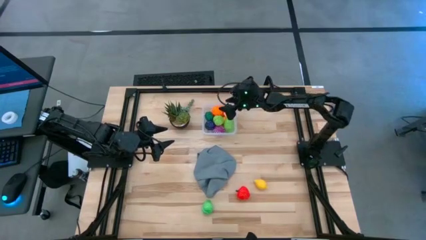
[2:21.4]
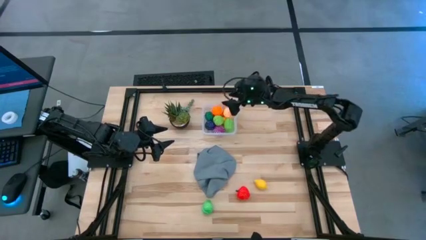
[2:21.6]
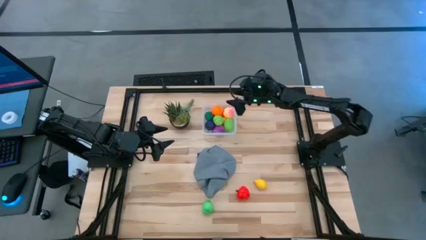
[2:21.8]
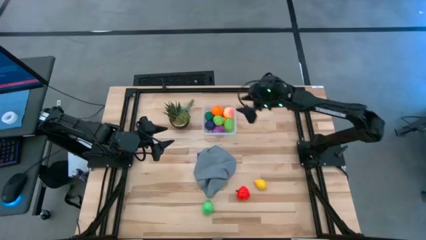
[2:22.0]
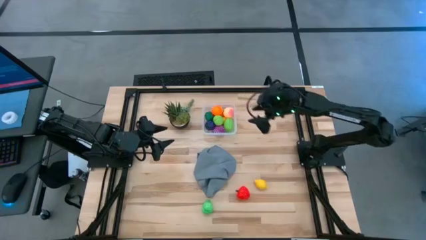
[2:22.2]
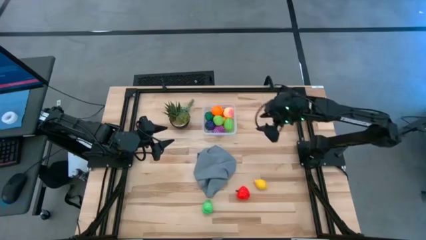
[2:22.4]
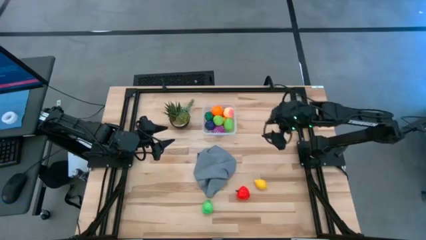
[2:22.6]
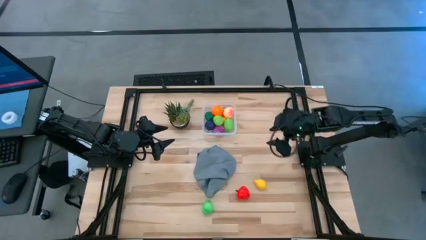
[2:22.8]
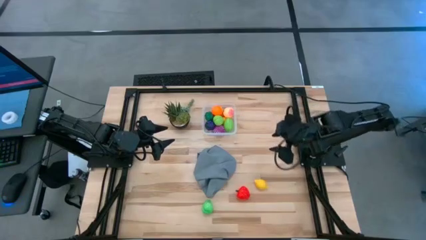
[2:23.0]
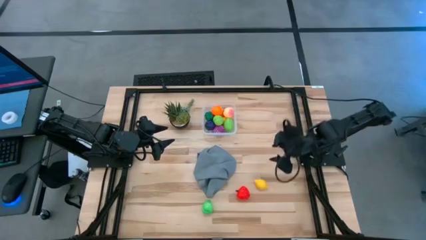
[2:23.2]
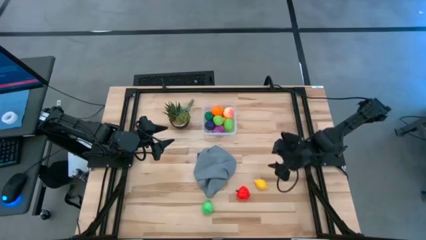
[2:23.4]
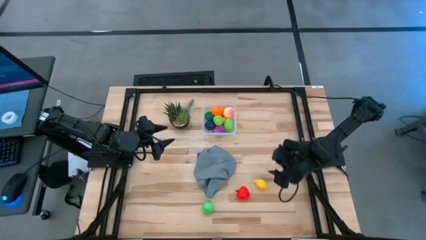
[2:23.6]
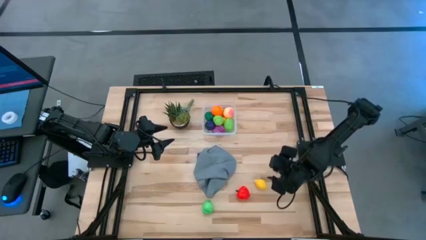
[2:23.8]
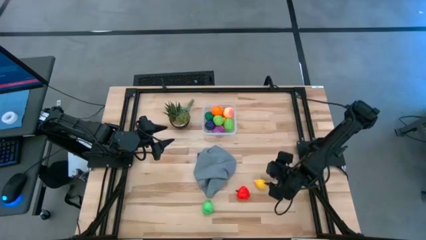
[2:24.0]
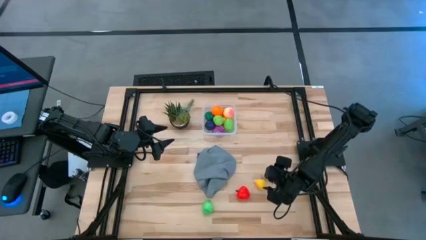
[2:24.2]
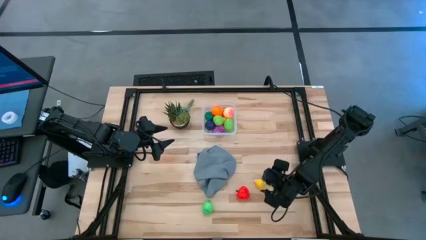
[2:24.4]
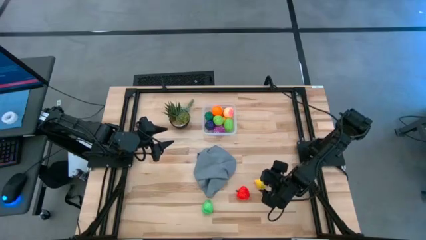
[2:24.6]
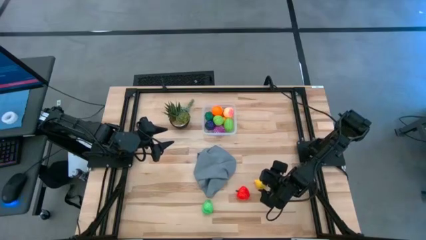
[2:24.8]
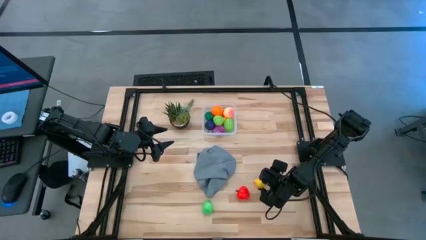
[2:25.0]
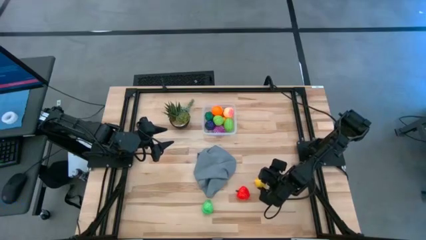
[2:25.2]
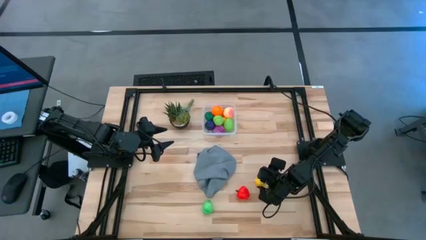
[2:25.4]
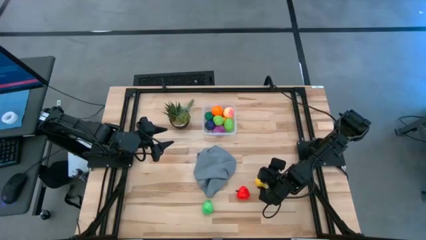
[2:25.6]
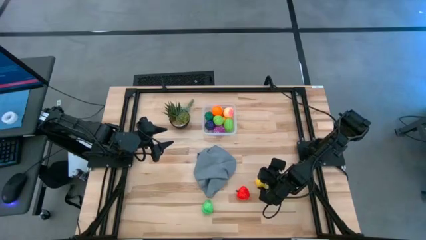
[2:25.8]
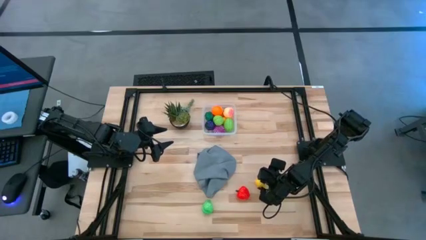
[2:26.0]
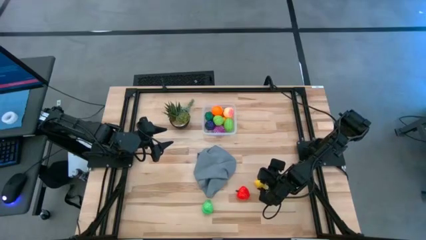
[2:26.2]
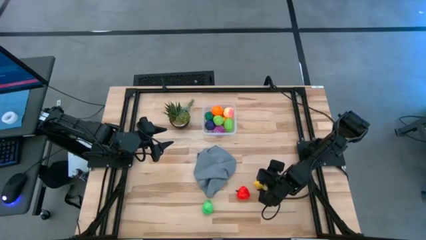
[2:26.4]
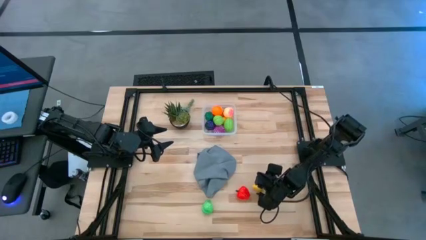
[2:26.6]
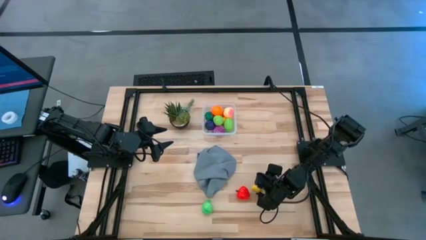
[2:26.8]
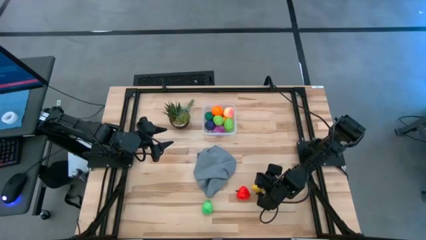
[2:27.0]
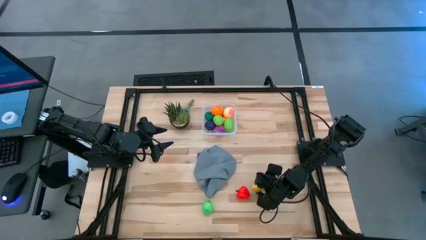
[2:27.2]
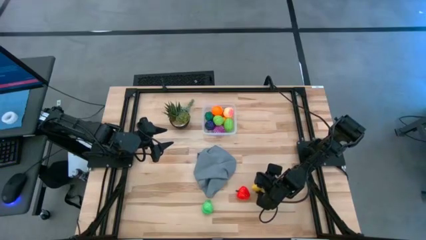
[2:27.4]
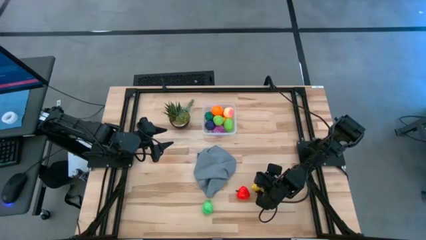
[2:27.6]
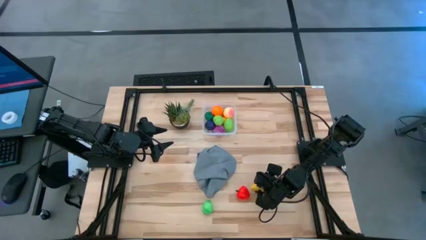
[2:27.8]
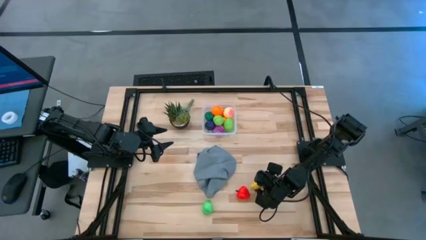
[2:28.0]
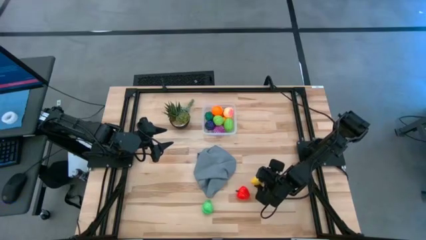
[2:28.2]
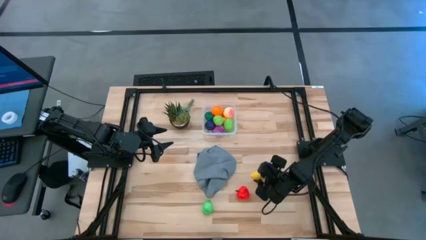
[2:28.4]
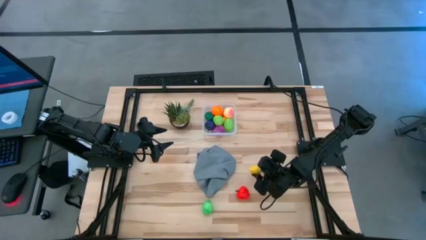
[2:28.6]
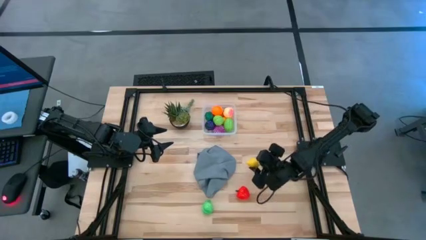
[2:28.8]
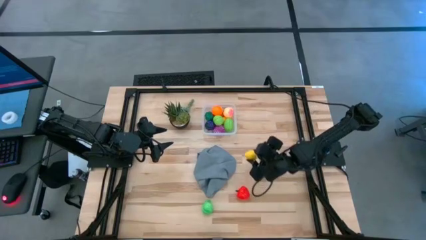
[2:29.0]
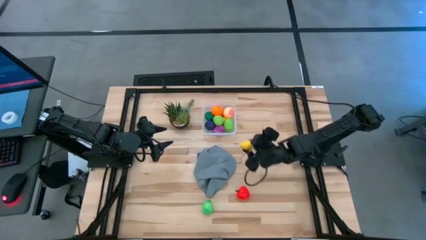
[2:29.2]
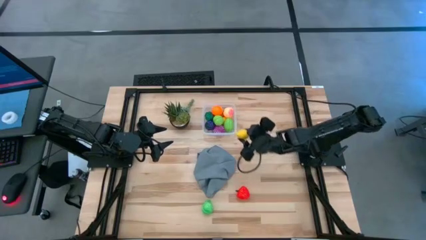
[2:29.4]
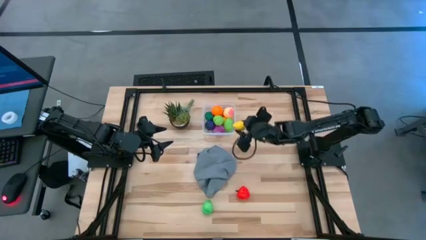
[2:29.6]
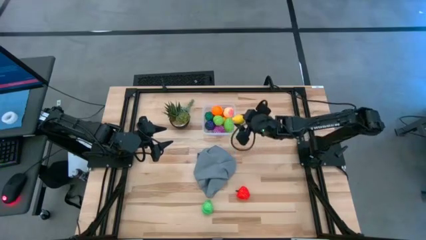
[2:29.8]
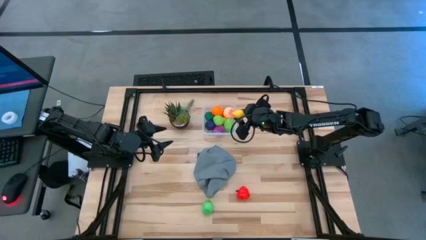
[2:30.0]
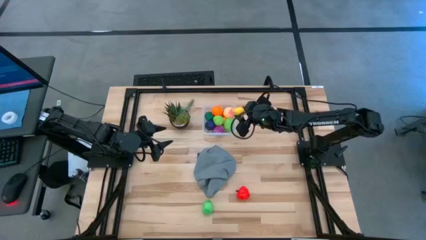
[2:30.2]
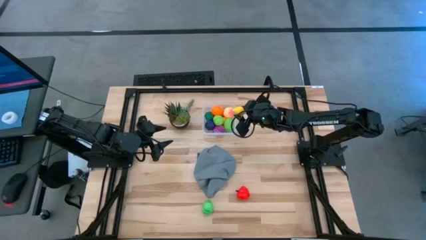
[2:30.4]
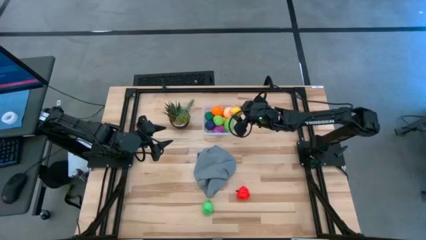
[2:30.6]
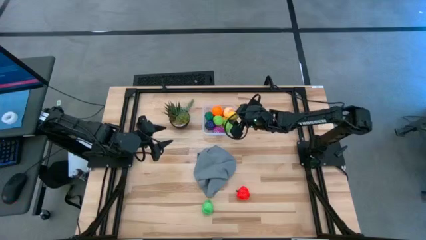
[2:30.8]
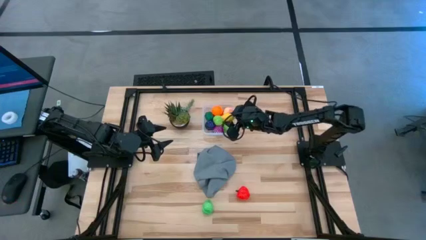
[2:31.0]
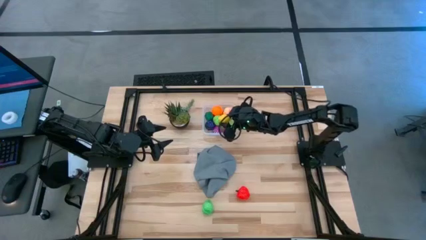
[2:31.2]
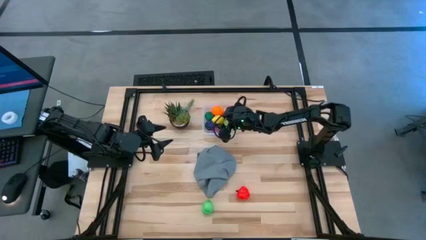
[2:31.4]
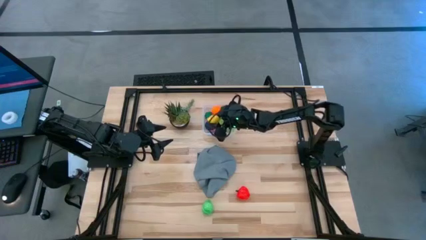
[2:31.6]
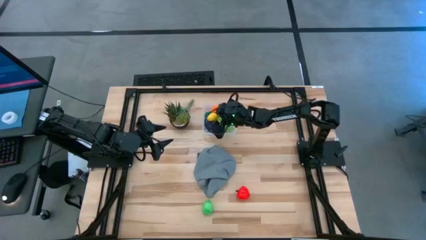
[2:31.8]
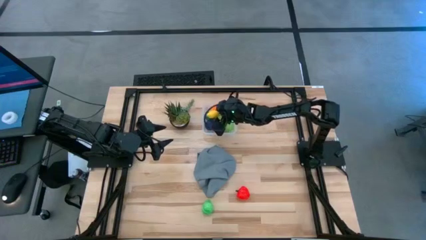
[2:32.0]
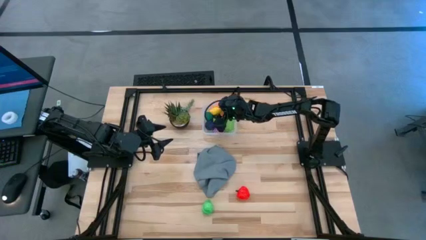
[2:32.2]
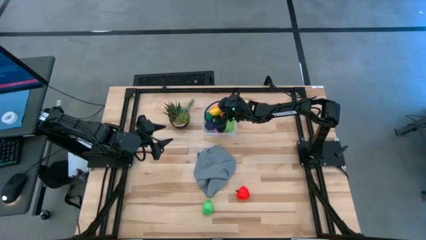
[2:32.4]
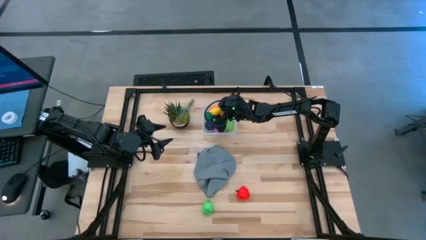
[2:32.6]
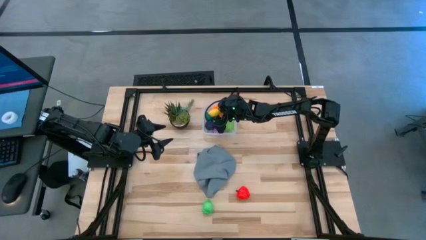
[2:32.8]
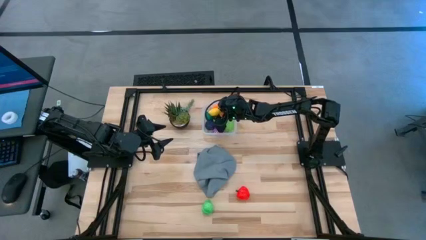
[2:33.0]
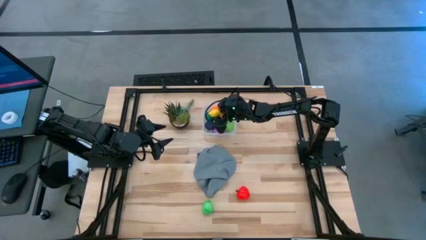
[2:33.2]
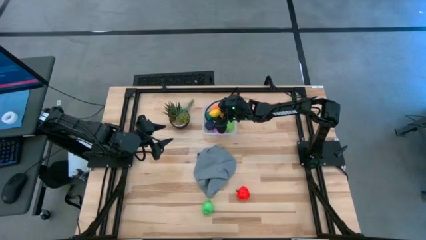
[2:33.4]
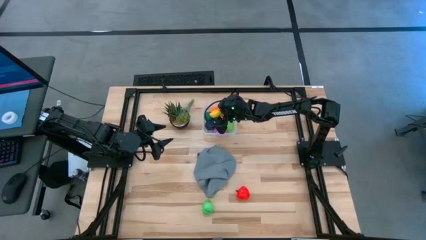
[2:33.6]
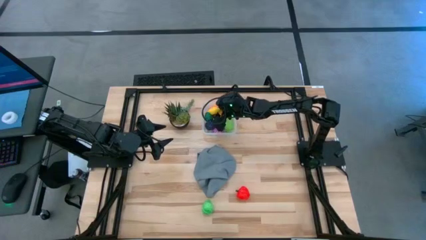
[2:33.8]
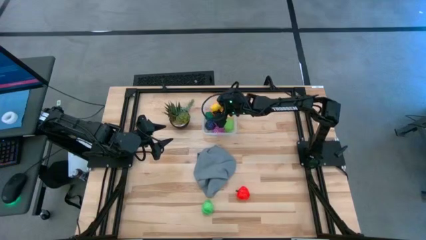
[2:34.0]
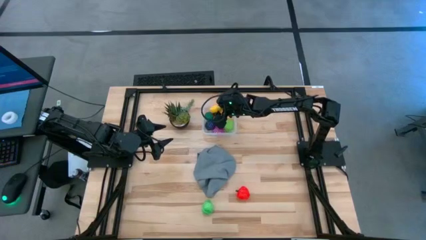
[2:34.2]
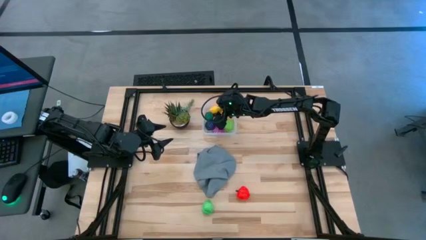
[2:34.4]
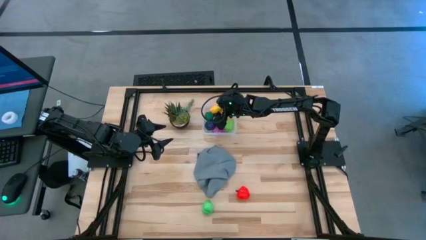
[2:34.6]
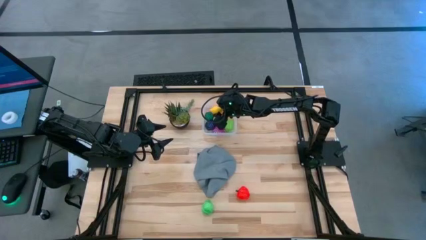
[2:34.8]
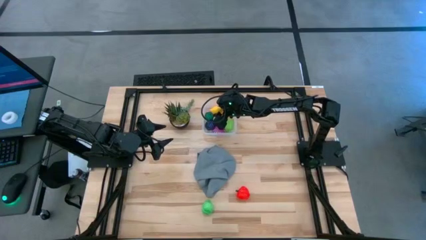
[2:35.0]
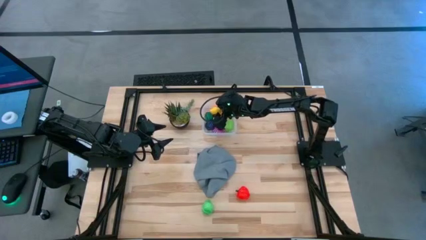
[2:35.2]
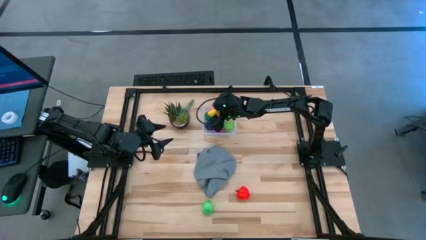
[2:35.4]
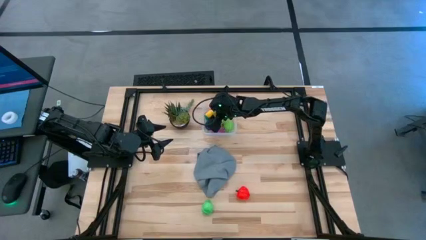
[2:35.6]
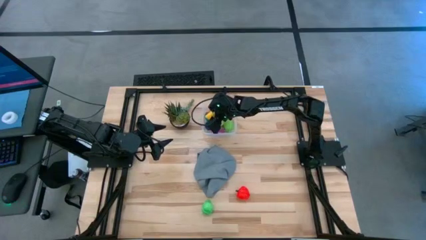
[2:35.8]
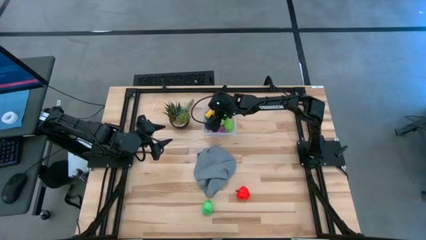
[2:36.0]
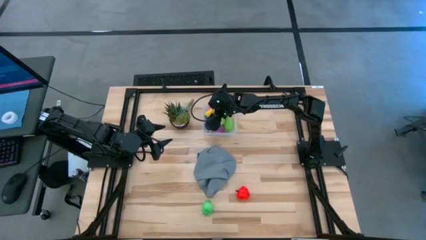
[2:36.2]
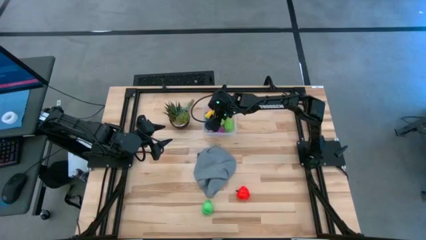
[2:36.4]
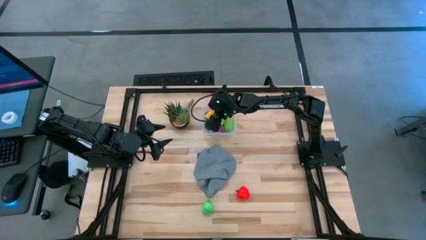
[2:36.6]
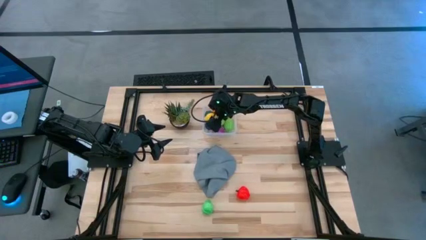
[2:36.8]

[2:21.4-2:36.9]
Task: Pick and placing Produce into tupperware
Put the yellow lemon into the transparent container

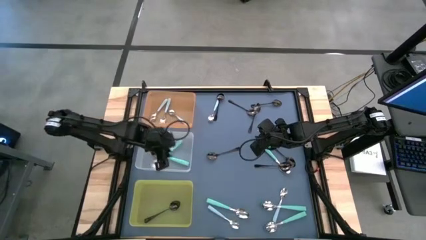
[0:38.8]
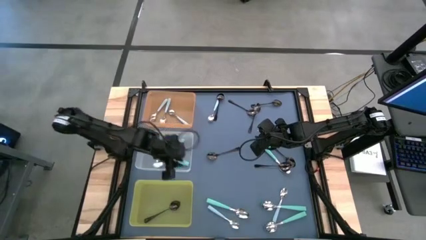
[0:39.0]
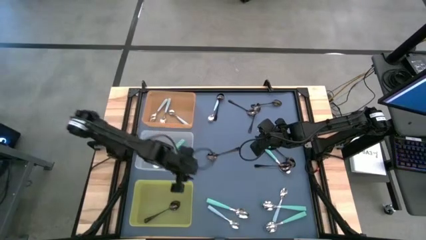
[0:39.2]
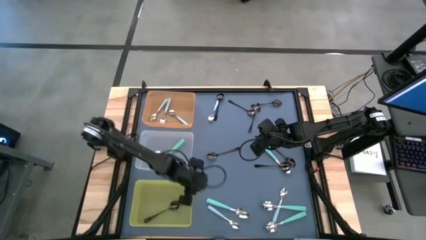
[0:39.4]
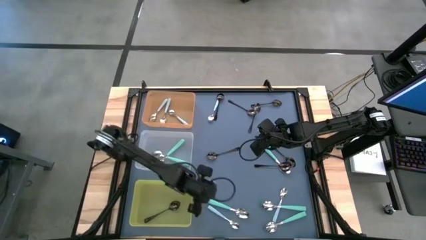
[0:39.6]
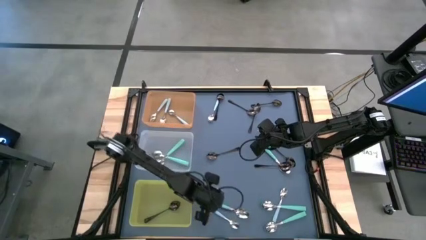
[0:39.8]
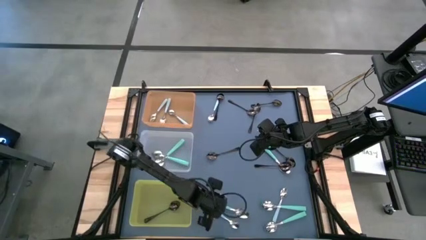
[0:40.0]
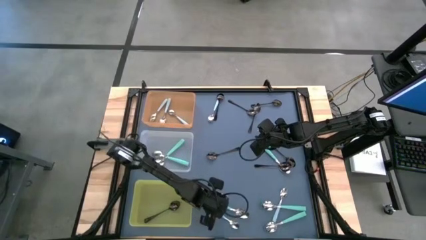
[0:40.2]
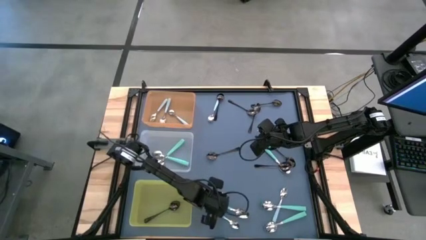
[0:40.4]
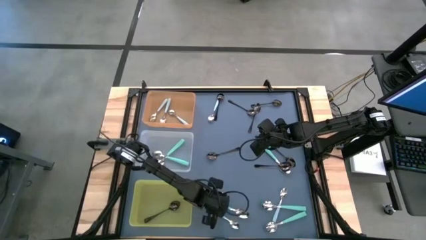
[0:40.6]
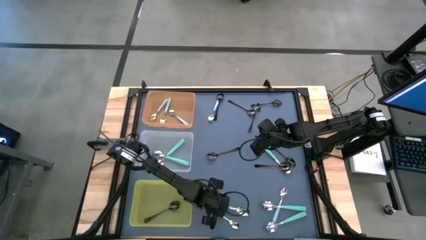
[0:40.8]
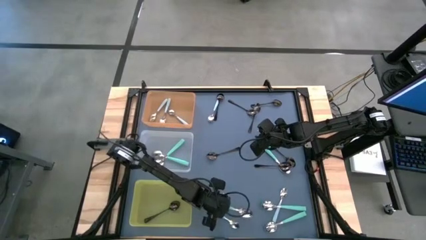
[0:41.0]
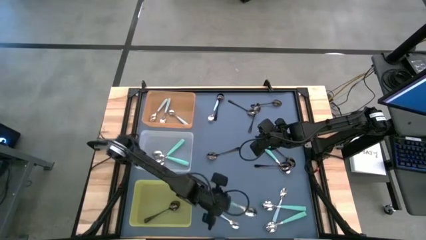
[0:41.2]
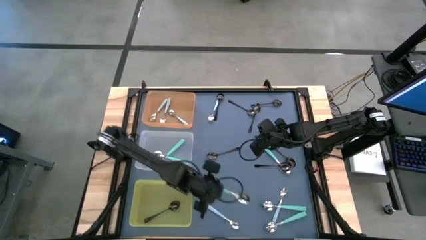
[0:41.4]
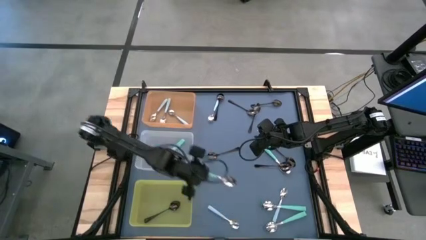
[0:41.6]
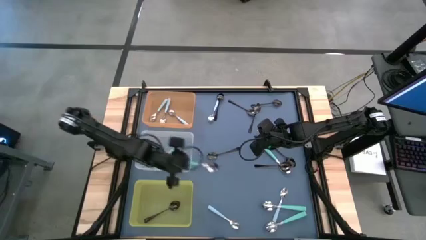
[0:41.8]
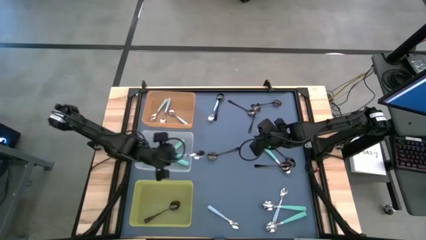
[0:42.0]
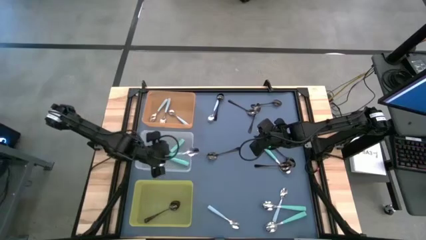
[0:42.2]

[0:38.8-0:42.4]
Task: Sort silverware by color (type)
Put the light green spoon into the transparent bin
